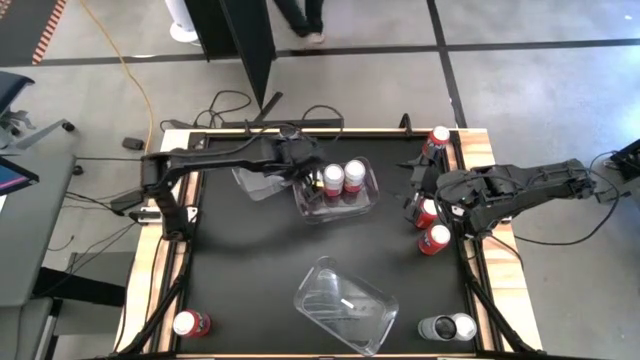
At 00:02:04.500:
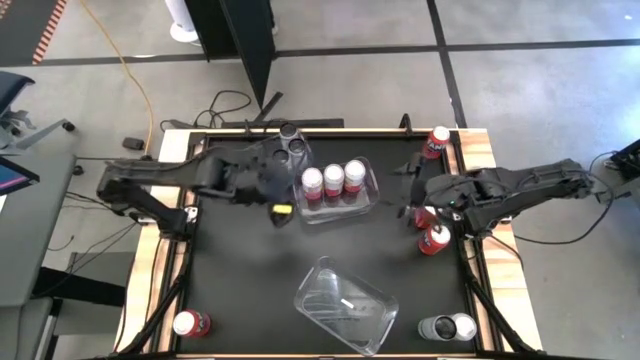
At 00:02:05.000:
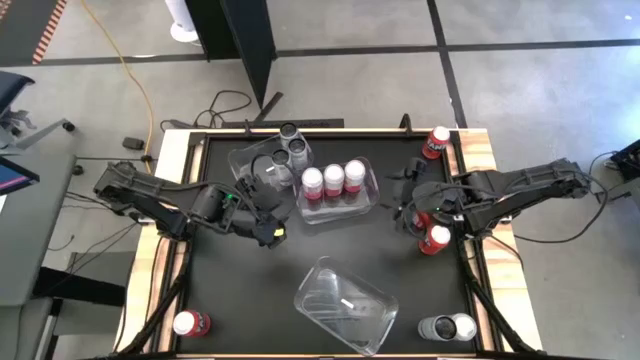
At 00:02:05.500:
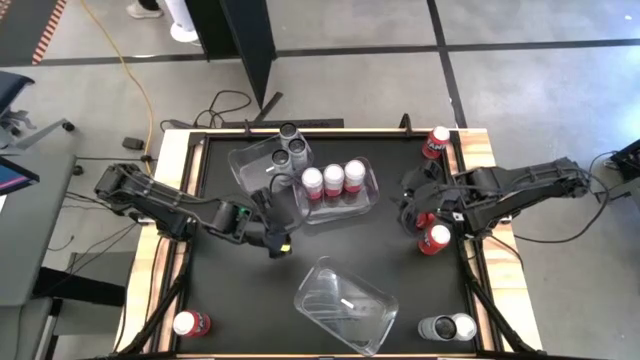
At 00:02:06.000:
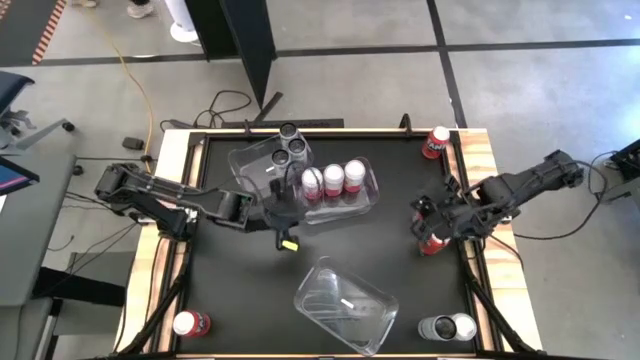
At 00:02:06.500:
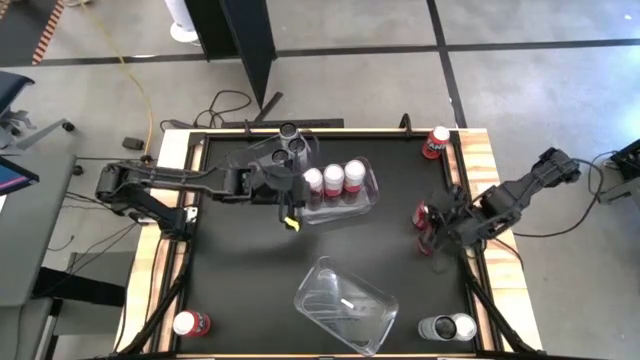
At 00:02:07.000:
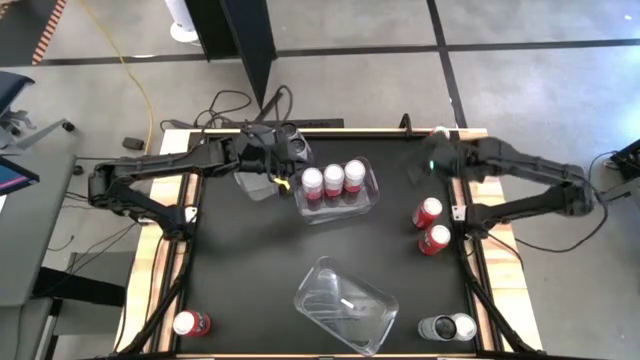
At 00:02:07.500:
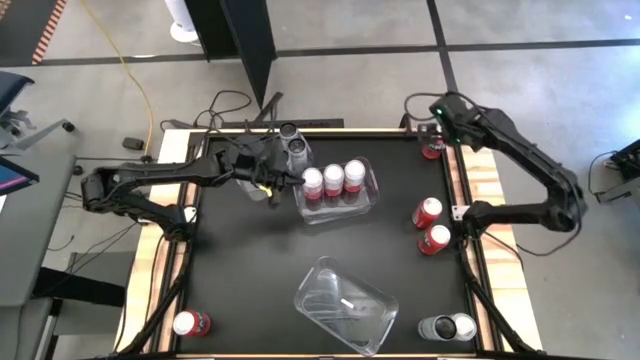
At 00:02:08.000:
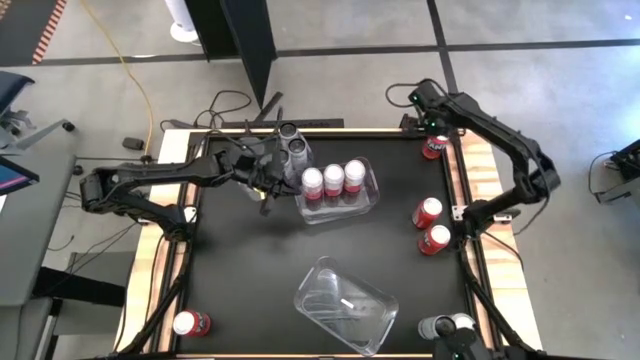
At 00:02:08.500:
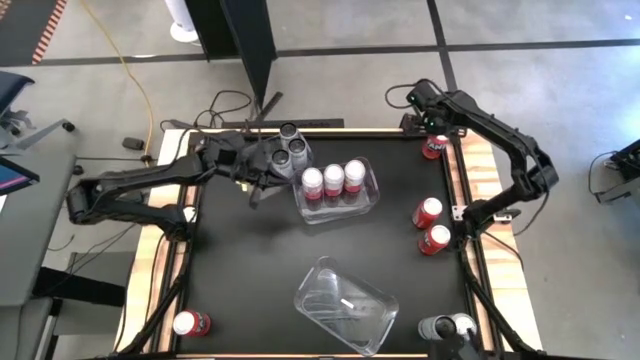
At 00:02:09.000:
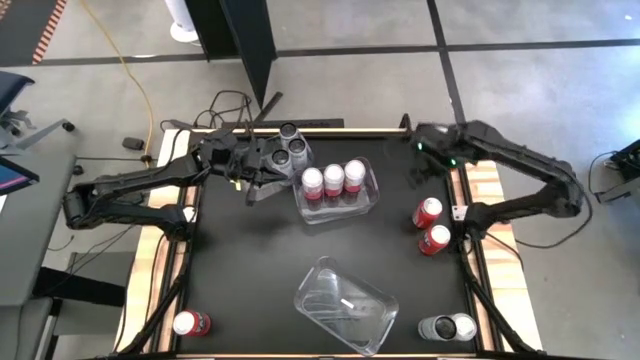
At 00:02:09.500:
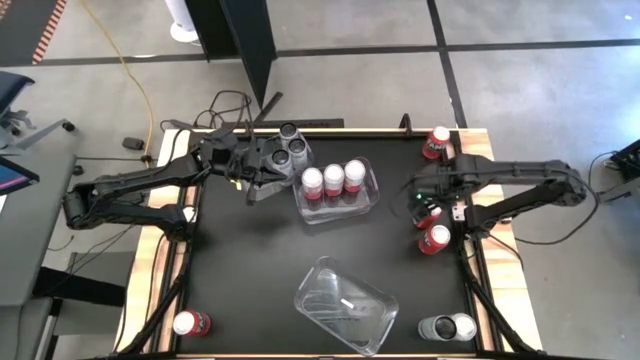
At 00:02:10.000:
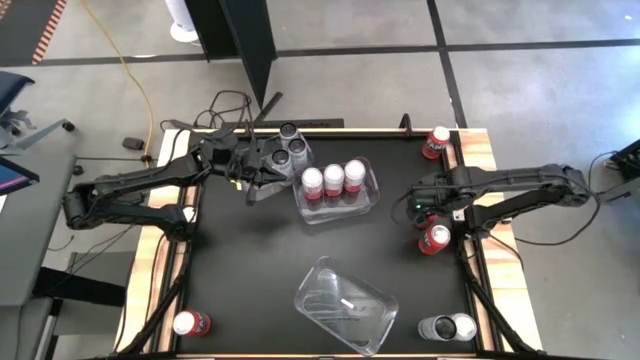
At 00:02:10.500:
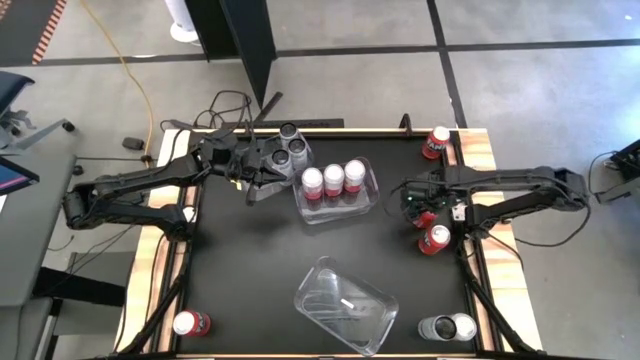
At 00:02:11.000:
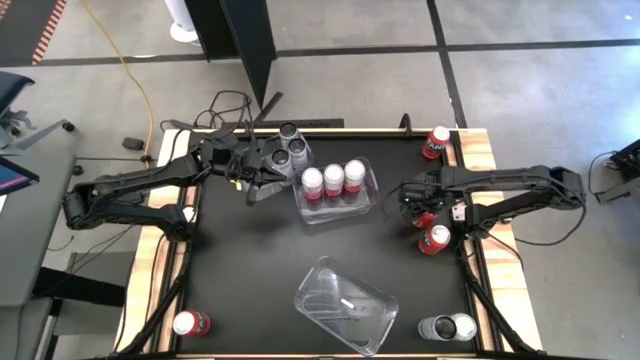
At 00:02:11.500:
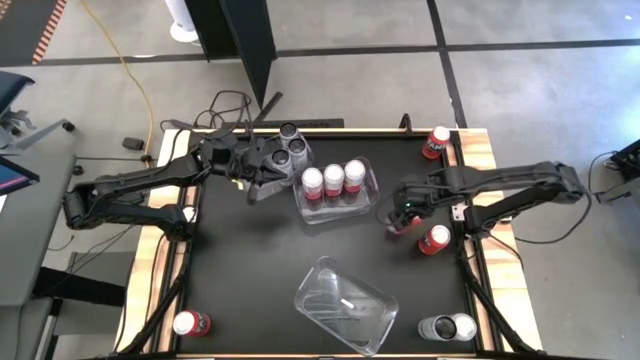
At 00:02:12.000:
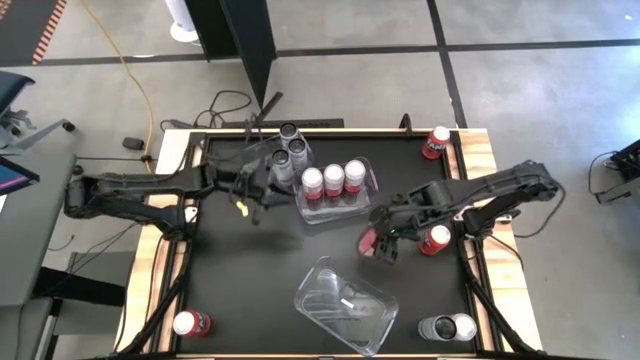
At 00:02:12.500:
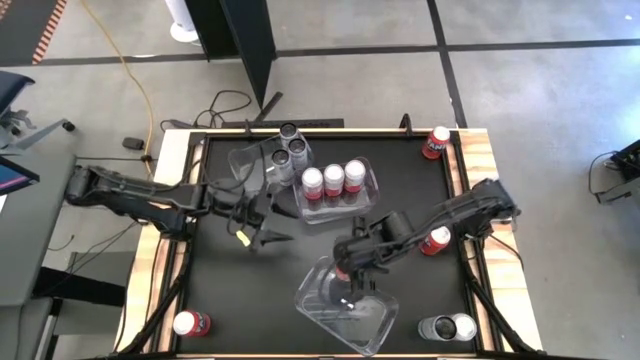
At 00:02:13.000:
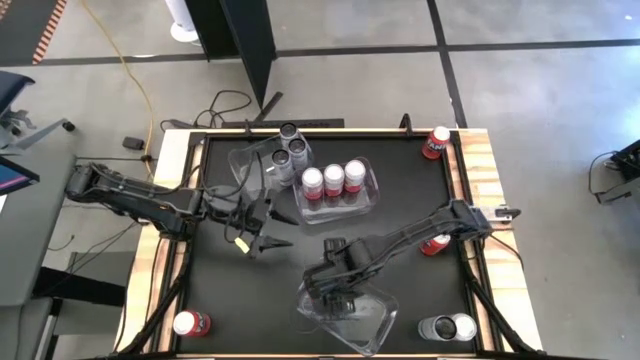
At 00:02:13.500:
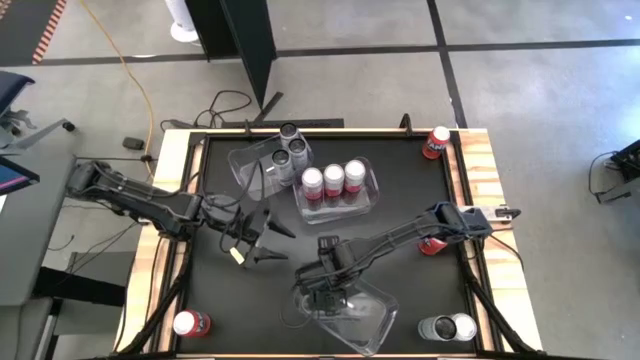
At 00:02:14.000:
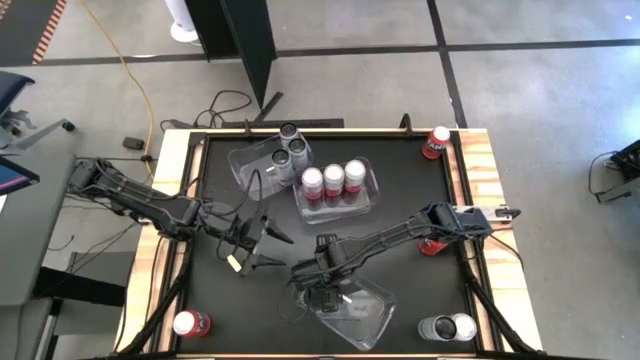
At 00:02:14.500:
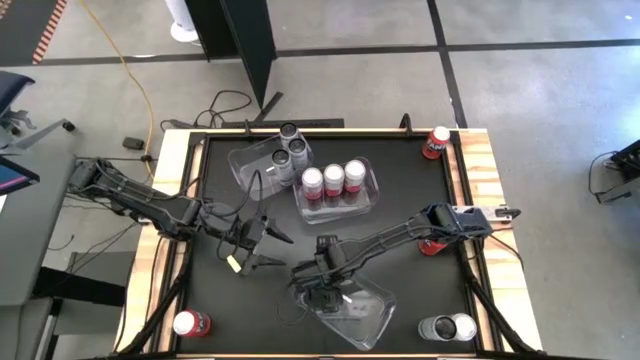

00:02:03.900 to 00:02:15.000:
Task: Sort soda cans
Put the middle right orange soda can in the bottom transparent bin

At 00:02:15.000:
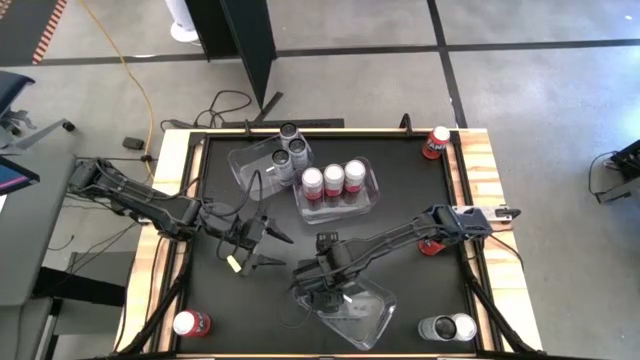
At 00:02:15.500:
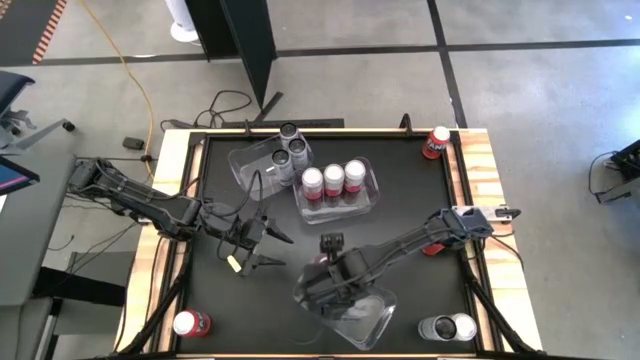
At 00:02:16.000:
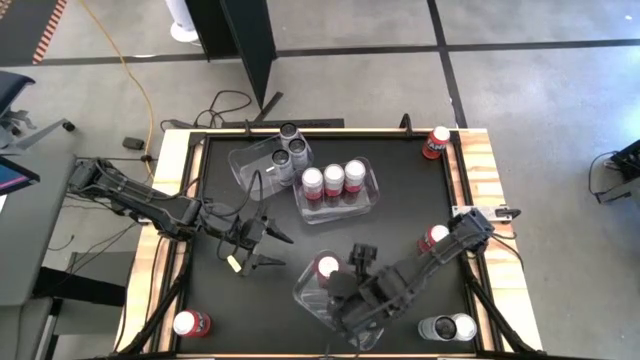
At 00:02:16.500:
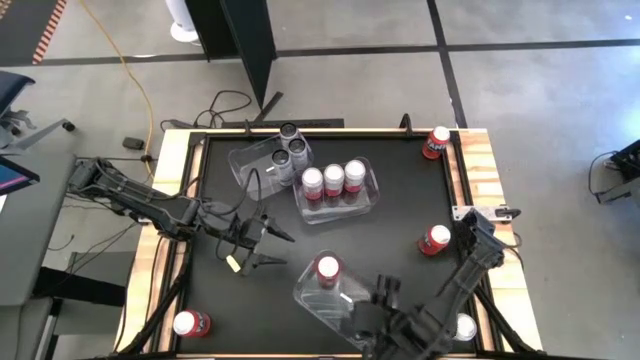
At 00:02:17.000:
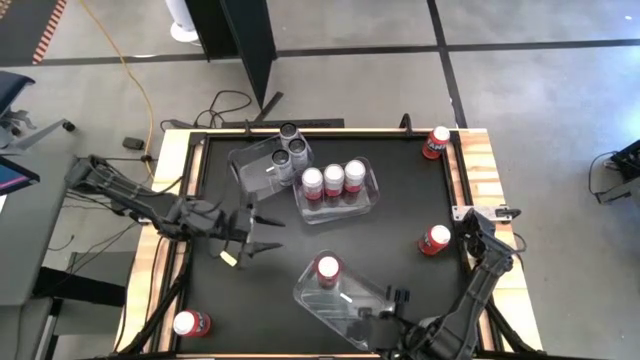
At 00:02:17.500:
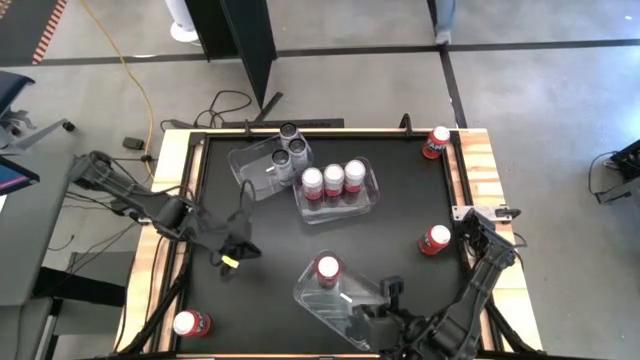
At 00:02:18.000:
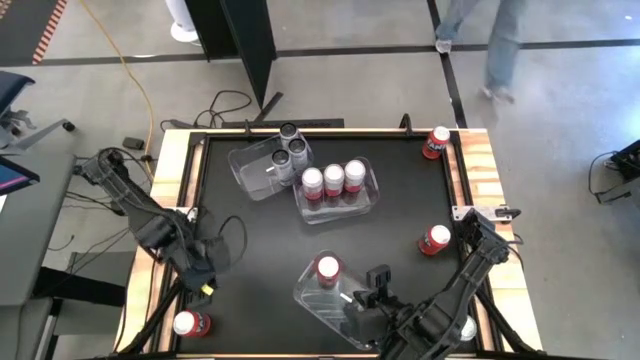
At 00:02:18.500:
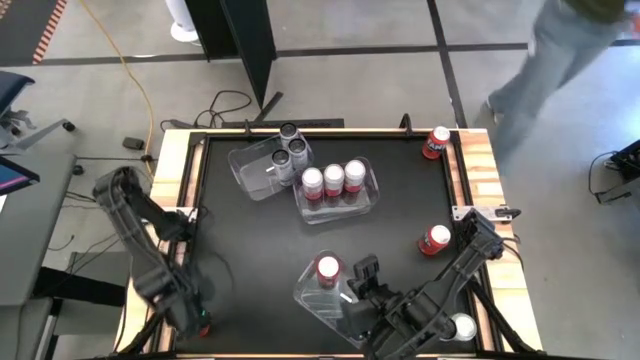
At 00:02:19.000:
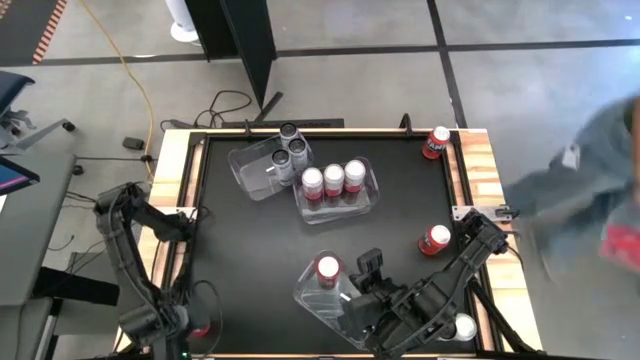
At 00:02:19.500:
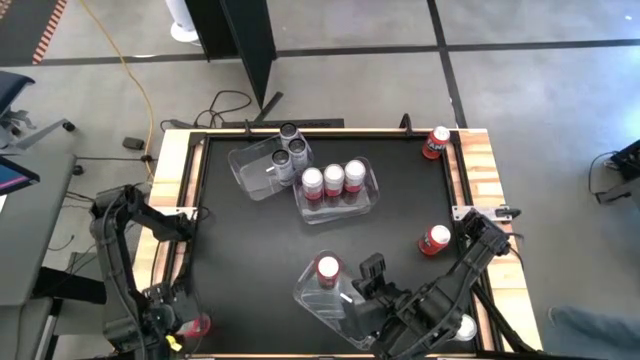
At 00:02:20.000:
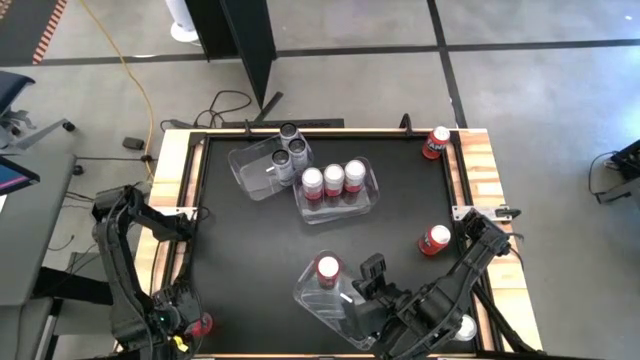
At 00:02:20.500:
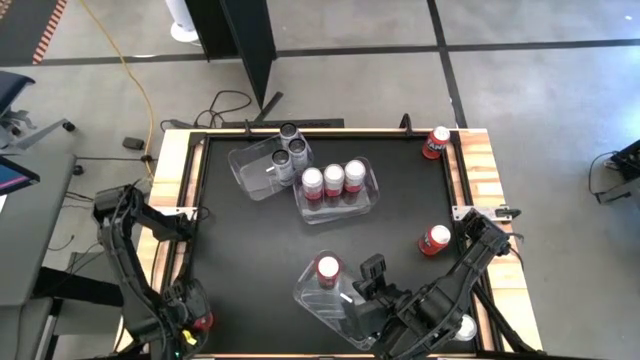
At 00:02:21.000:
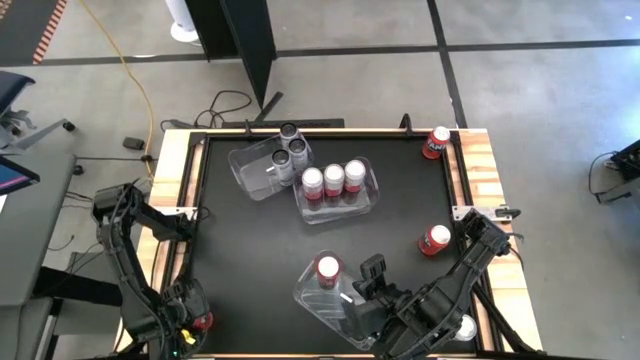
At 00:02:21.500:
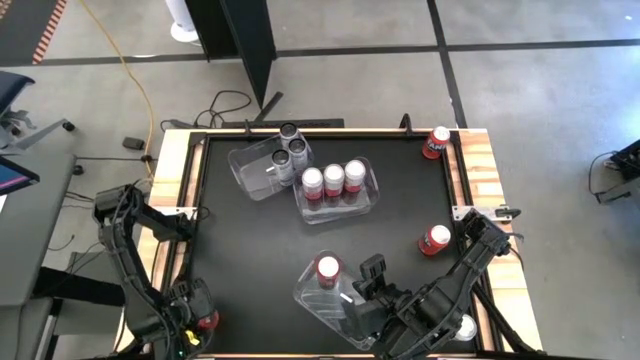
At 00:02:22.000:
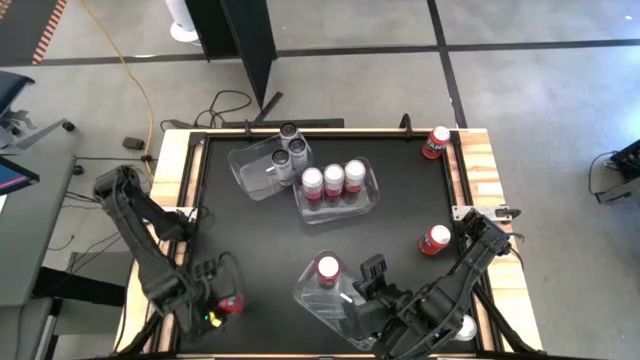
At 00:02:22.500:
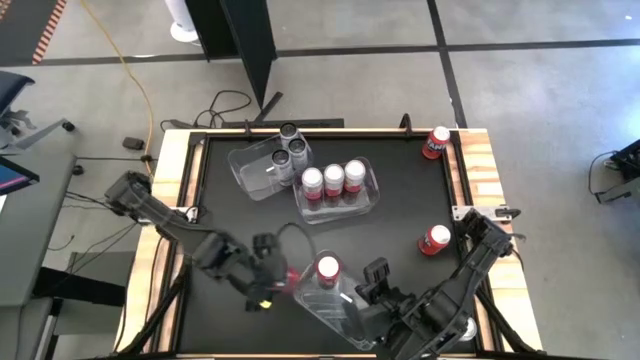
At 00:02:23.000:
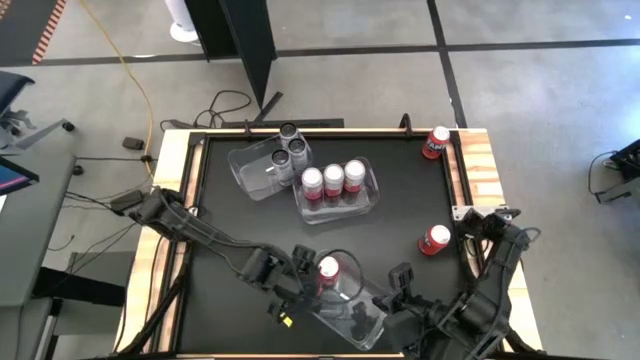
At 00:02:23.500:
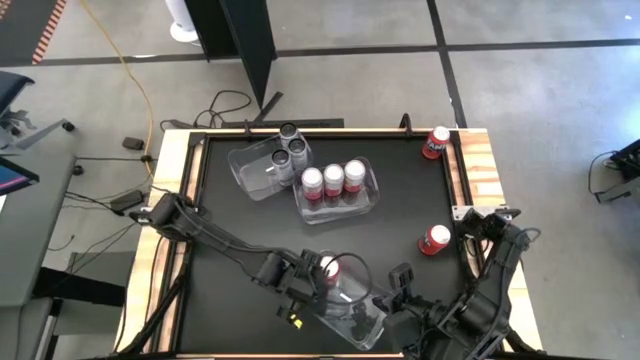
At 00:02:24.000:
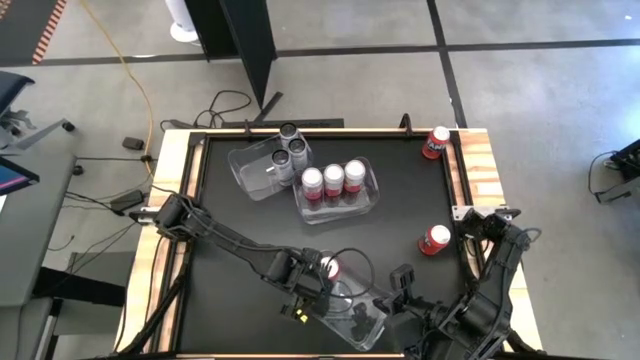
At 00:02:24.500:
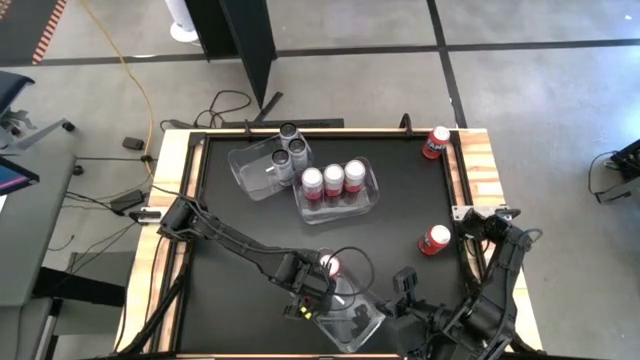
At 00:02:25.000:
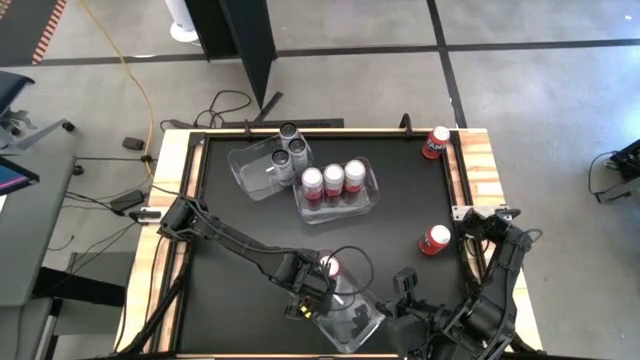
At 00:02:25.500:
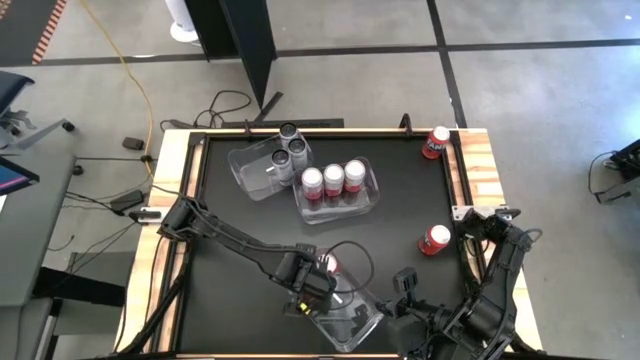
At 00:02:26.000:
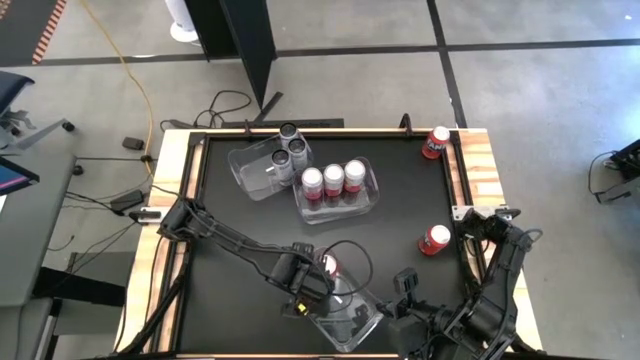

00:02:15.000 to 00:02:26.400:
Put the bottom left orange soda can in the bottom transparent bin
